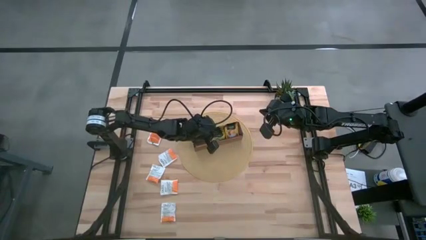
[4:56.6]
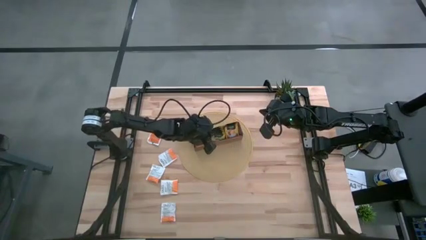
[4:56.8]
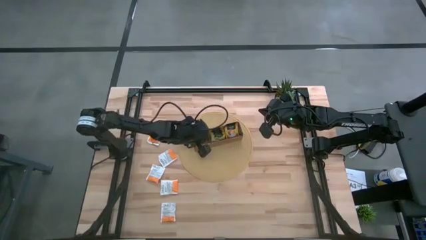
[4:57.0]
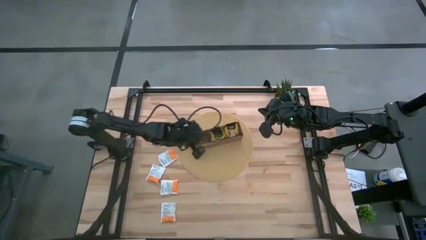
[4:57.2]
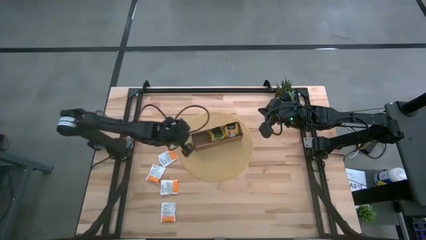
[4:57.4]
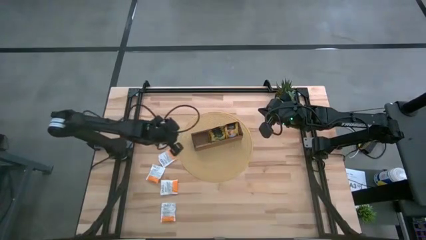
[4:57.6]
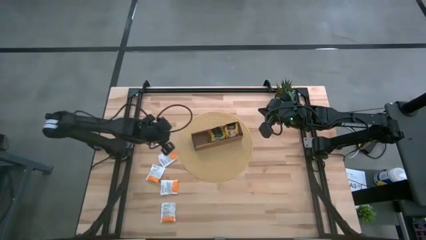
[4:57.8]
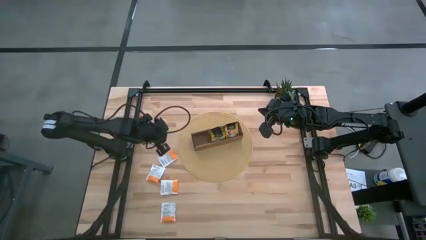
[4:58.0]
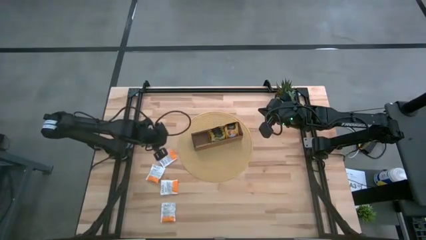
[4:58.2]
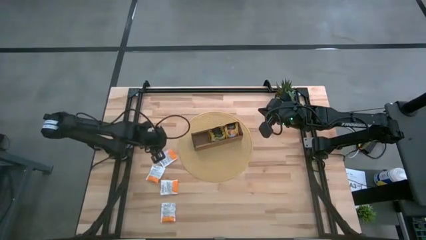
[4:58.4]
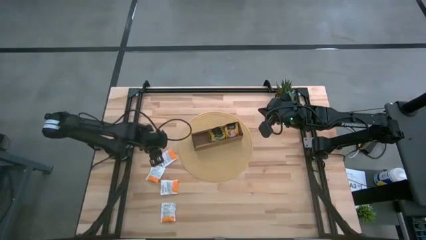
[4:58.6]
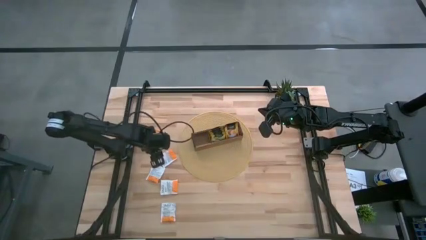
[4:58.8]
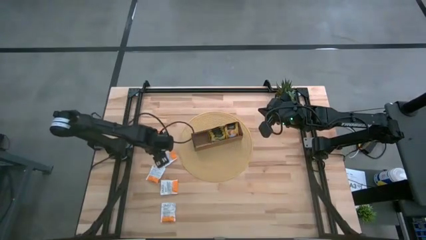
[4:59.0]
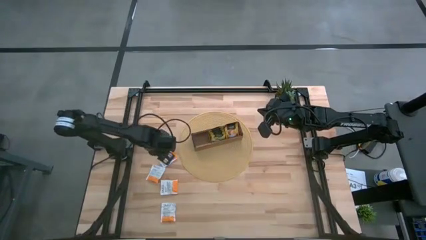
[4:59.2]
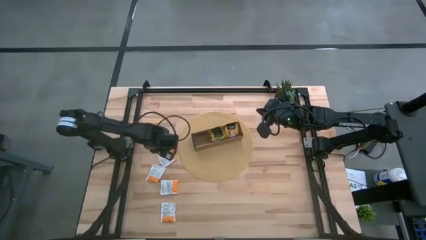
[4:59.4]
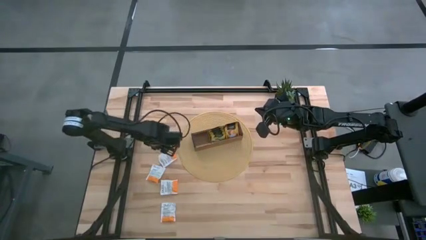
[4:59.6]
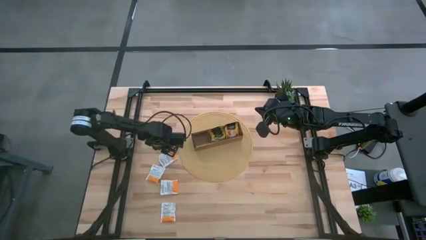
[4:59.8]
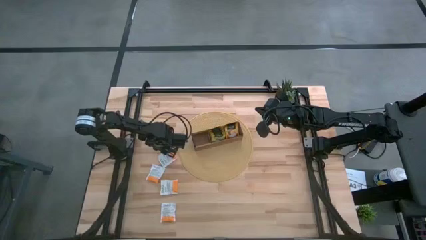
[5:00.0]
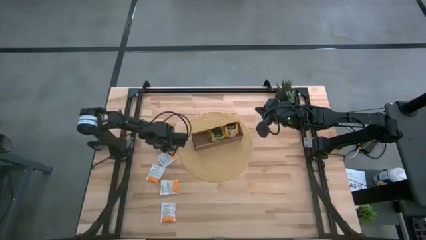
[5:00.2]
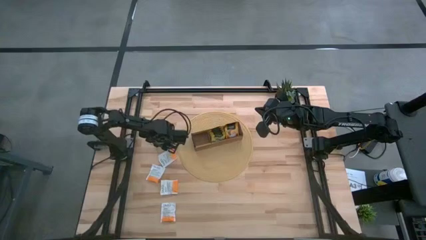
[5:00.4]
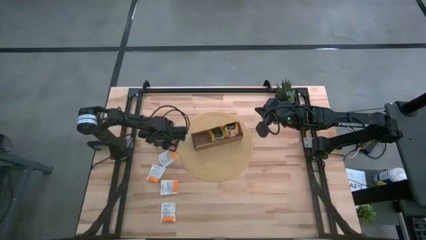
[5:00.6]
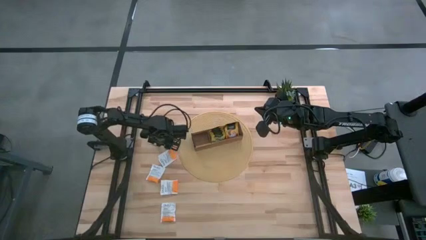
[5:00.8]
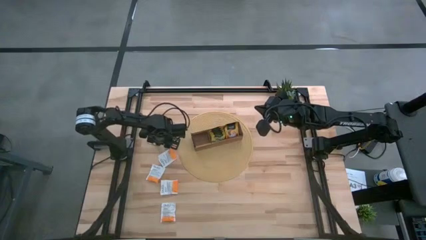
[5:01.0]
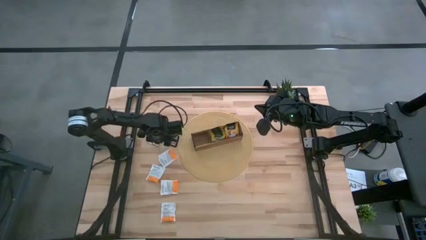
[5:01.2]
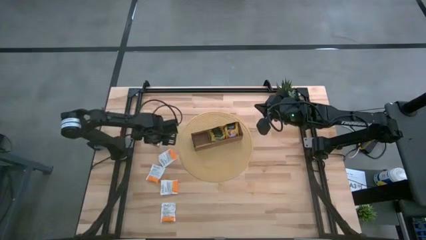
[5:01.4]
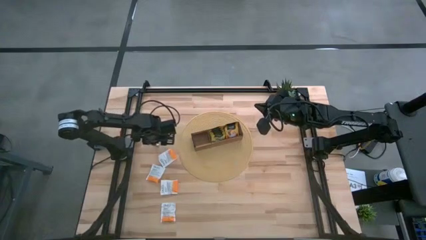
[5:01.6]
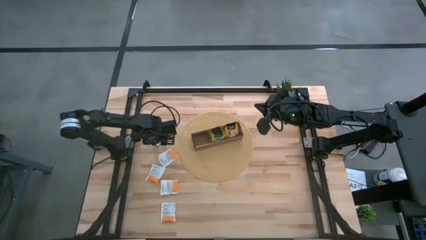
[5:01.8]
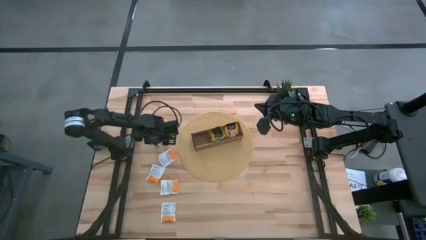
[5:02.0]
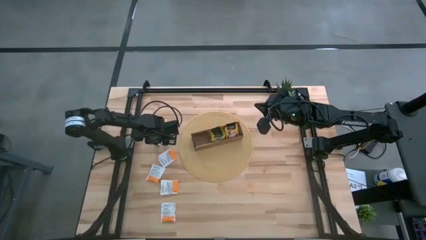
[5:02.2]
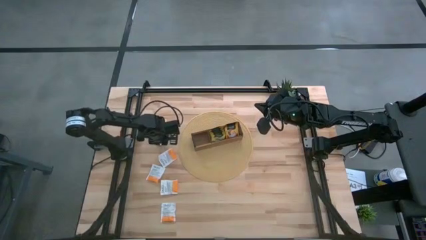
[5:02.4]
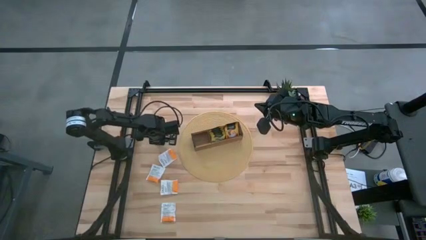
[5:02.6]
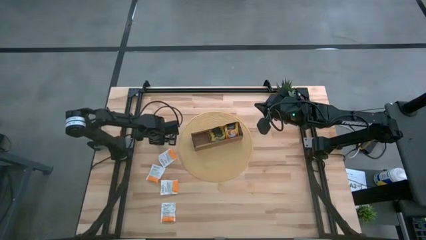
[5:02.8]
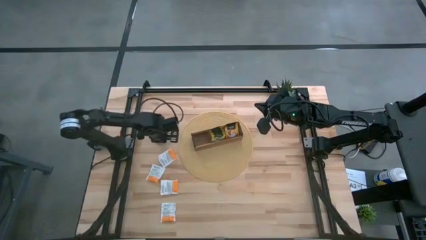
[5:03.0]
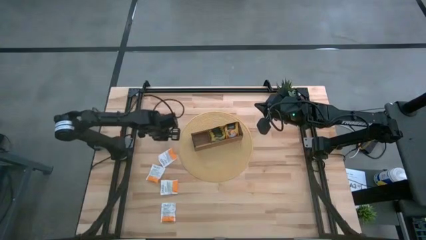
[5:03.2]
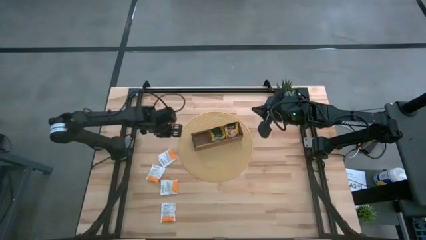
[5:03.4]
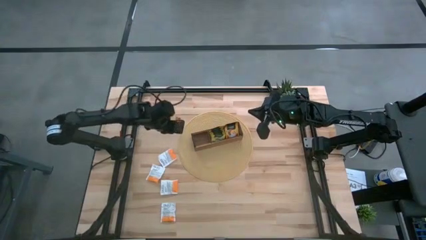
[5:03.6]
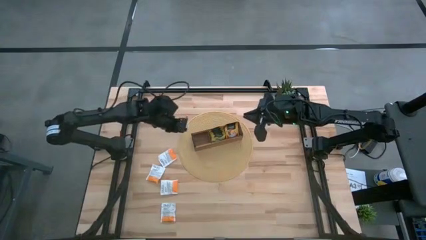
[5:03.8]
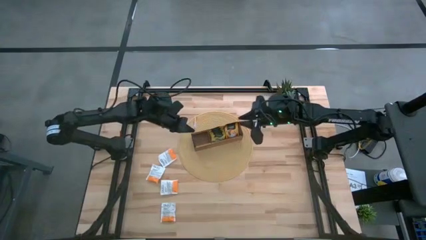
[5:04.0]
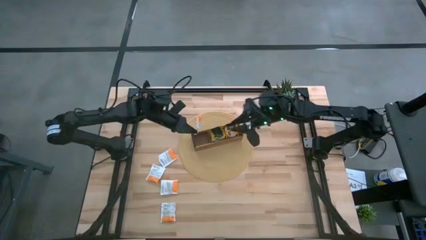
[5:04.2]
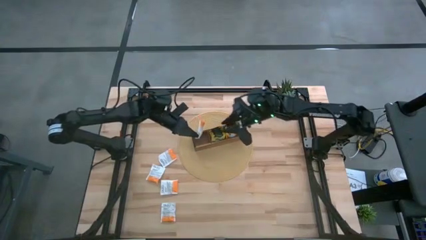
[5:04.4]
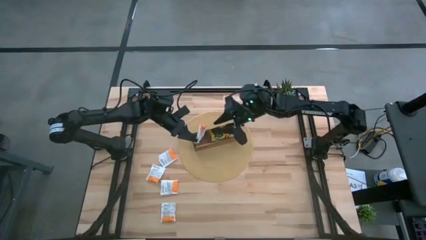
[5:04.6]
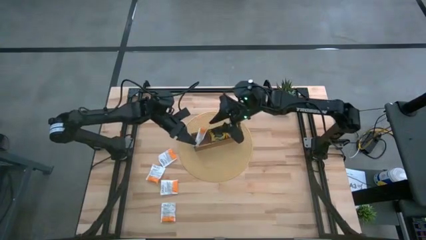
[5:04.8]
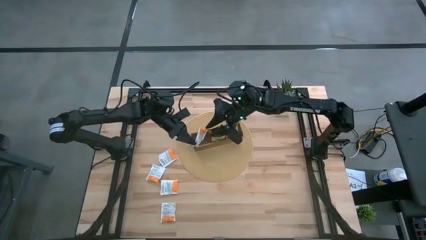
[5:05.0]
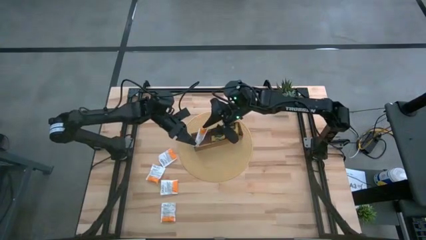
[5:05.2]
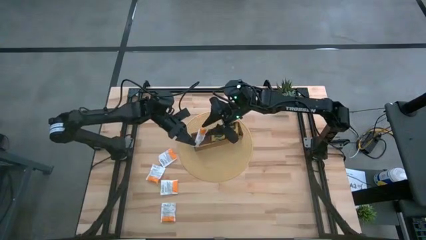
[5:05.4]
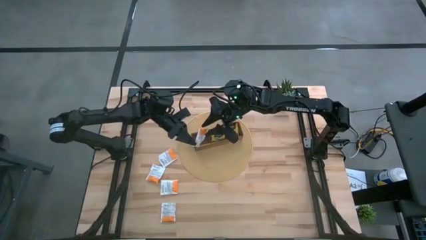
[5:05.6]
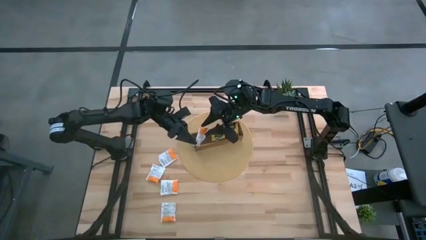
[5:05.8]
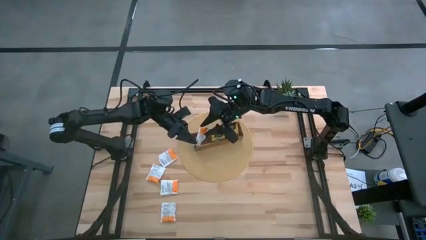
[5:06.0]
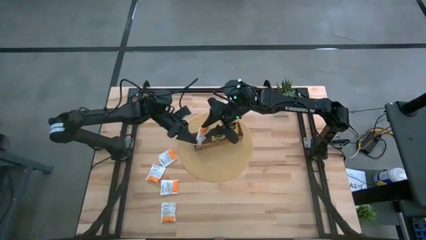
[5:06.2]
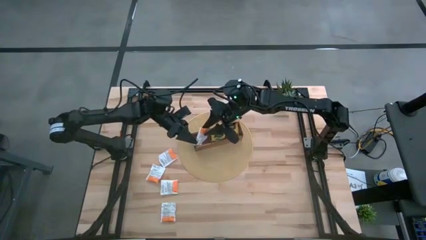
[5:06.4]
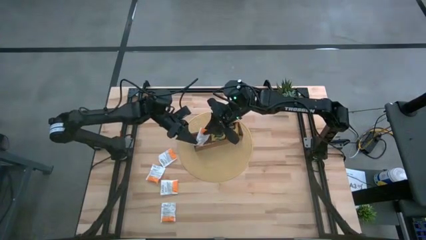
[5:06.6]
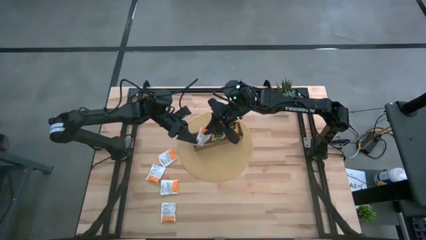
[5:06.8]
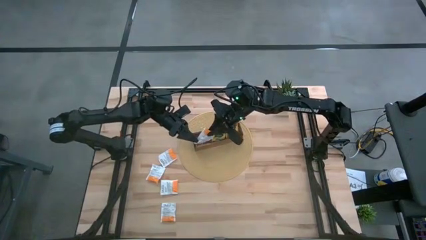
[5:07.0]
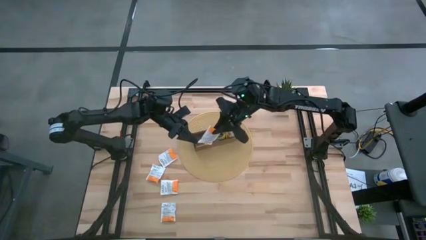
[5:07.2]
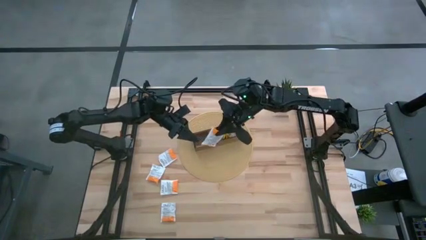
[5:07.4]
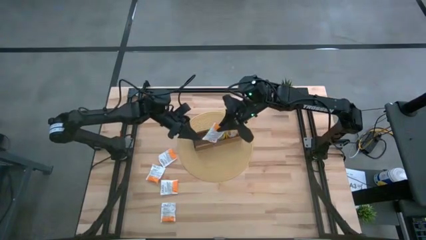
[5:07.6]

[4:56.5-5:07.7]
Task: Pick & Place Tea
Put the white tea bag into the left section of the wooden organizer

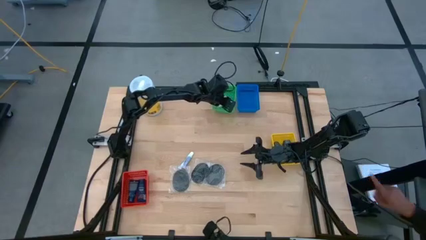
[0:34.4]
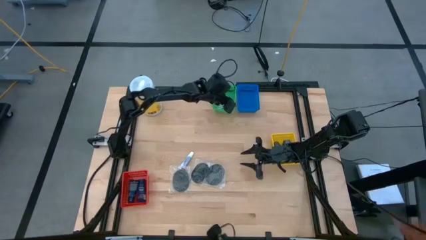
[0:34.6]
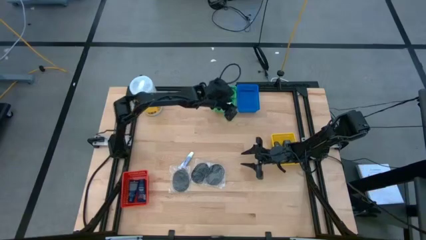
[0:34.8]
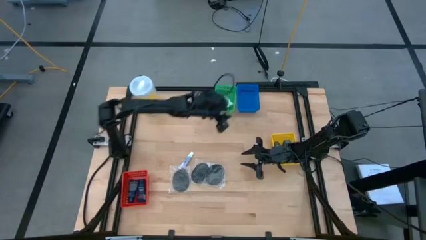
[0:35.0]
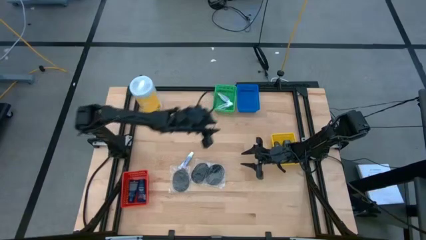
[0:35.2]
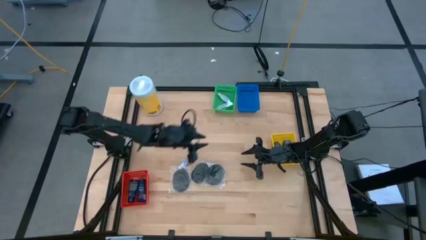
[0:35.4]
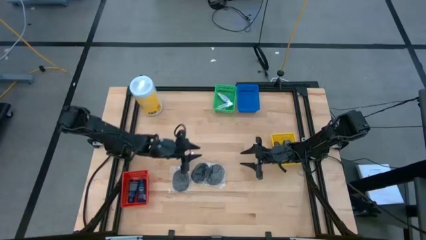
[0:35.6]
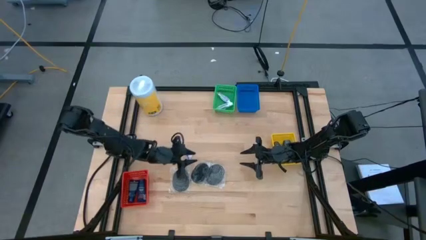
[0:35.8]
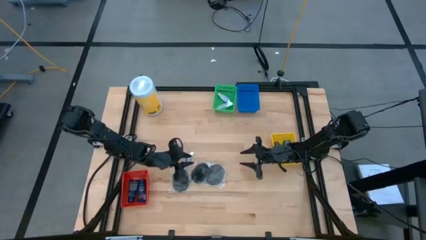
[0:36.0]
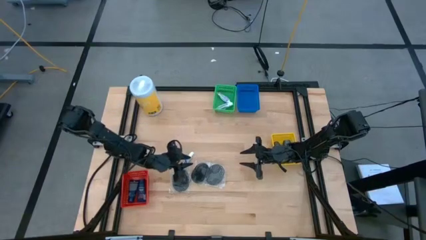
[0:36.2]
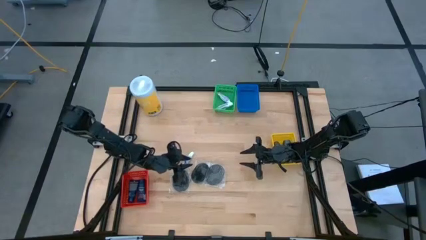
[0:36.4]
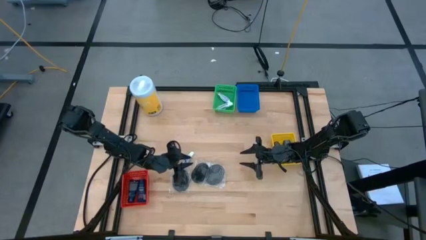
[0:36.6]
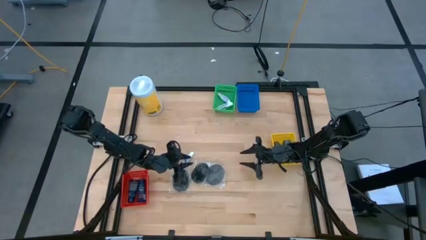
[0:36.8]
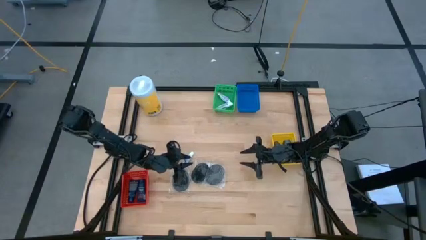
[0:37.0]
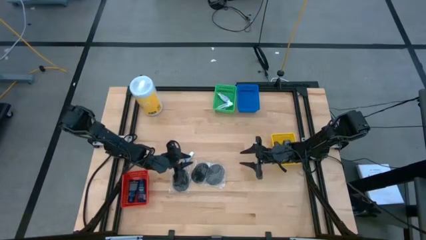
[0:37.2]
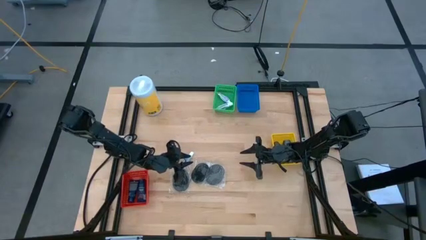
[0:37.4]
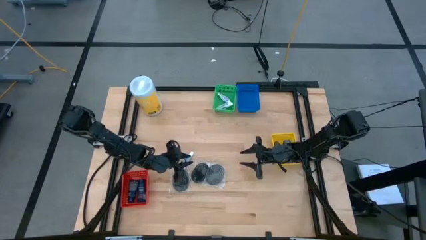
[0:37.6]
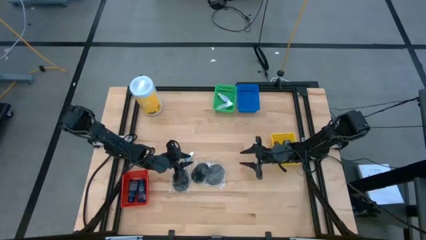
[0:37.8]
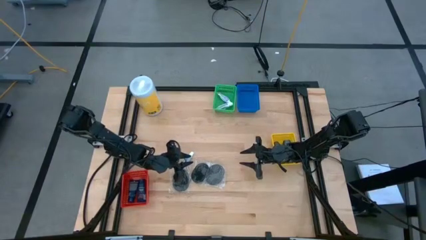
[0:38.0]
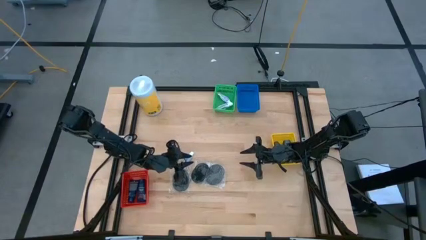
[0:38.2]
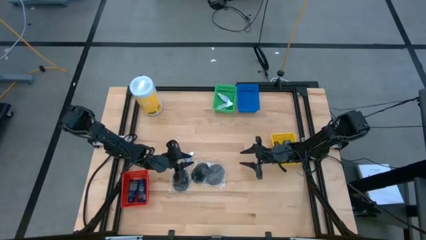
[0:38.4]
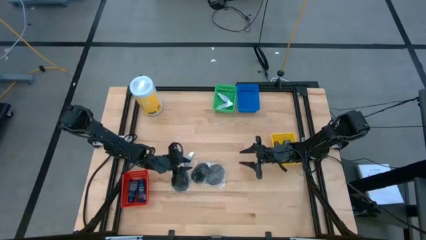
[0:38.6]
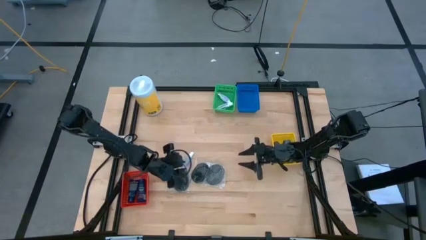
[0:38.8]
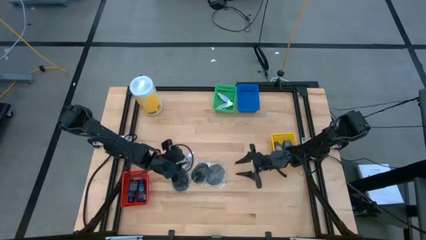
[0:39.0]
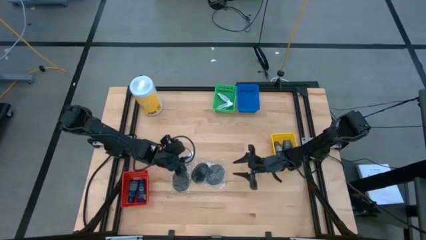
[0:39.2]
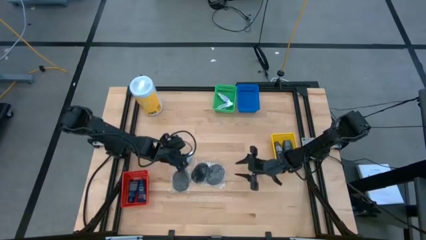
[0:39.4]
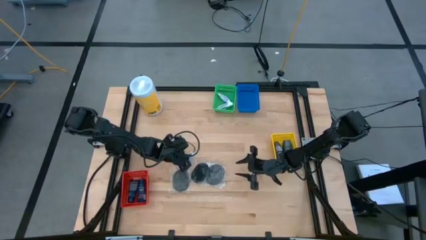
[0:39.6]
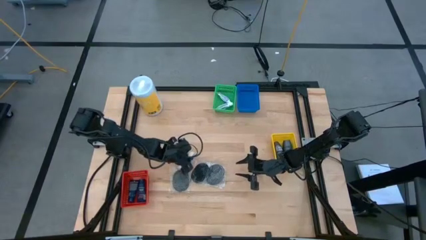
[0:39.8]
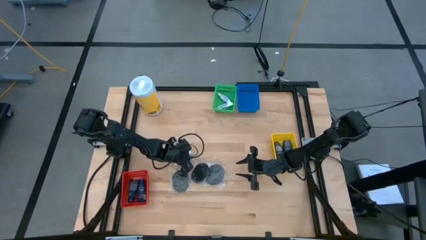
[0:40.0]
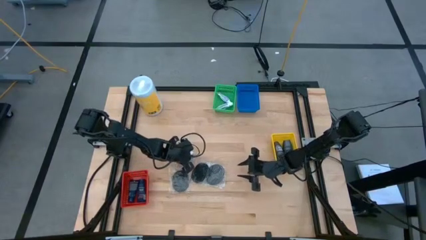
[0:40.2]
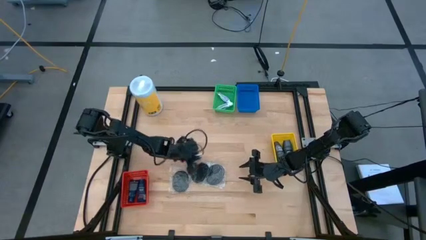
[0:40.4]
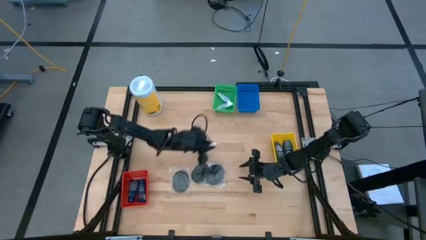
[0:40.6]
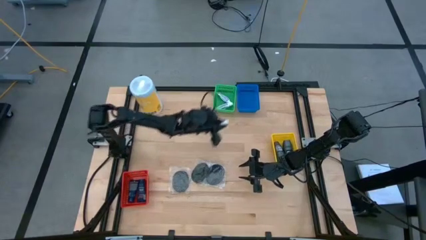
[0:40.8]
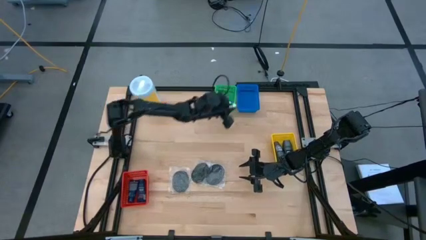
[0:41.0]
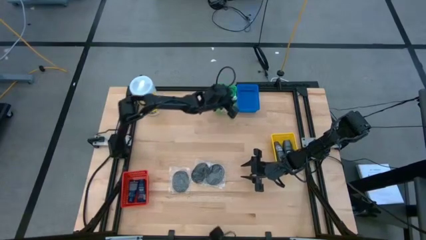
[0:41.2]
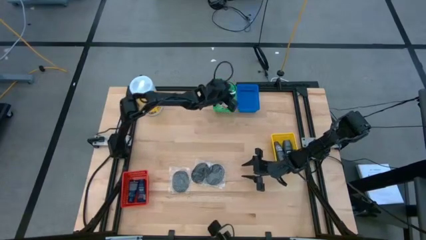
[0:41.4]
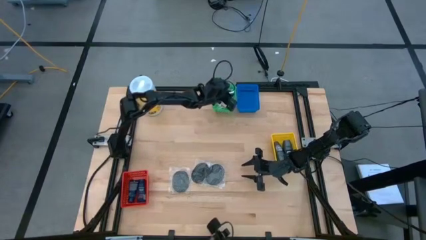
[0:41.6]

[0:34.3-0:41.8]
Task: Pick & Place Travel size toiletries
Put the white toothpaste into the green basket
